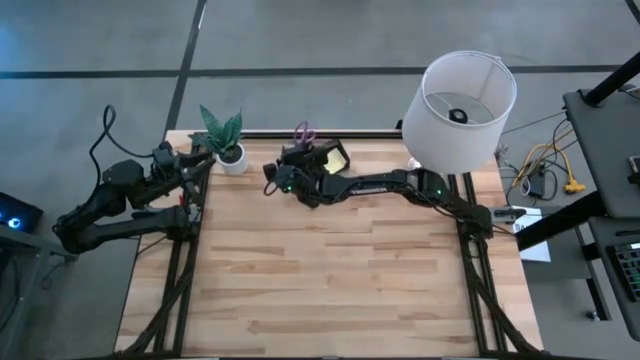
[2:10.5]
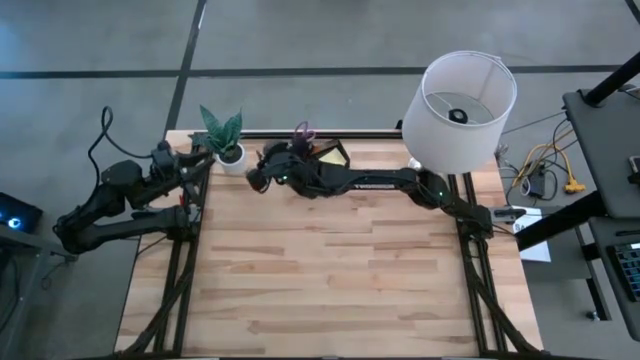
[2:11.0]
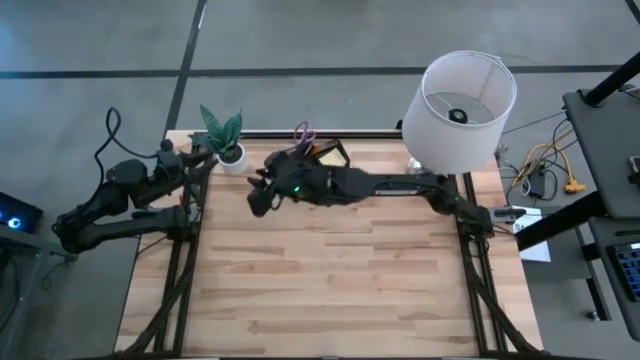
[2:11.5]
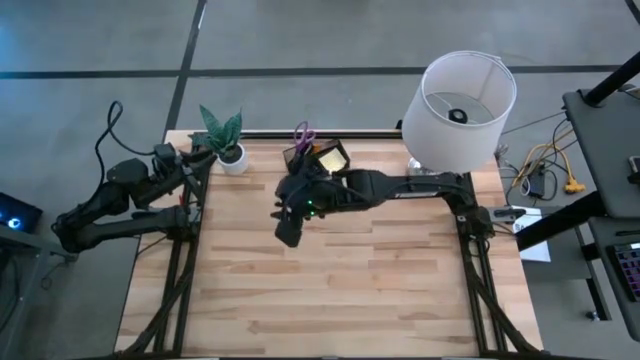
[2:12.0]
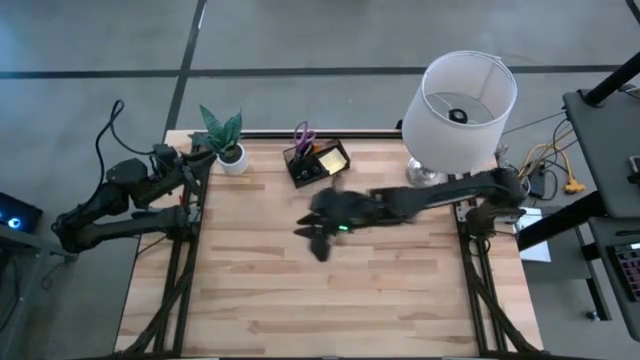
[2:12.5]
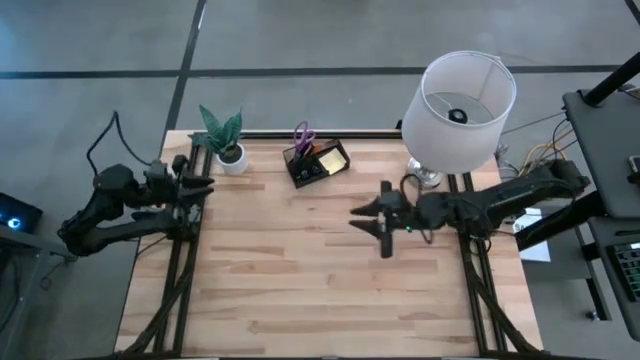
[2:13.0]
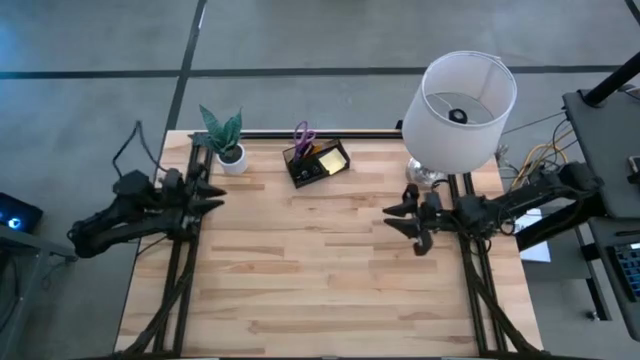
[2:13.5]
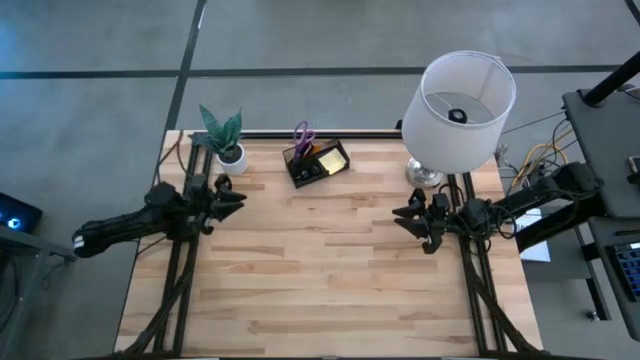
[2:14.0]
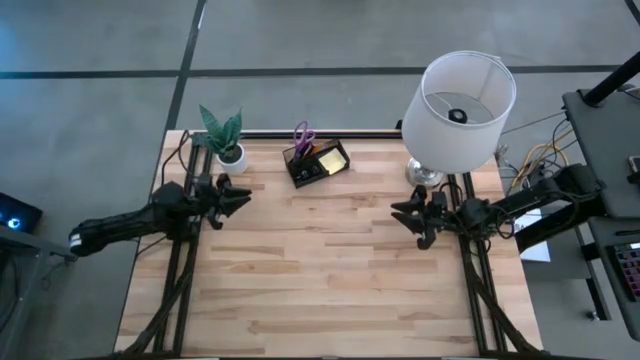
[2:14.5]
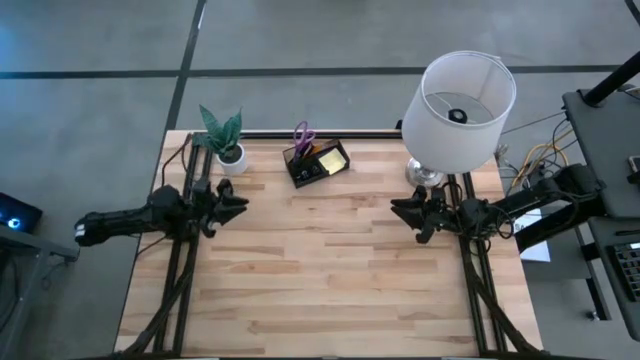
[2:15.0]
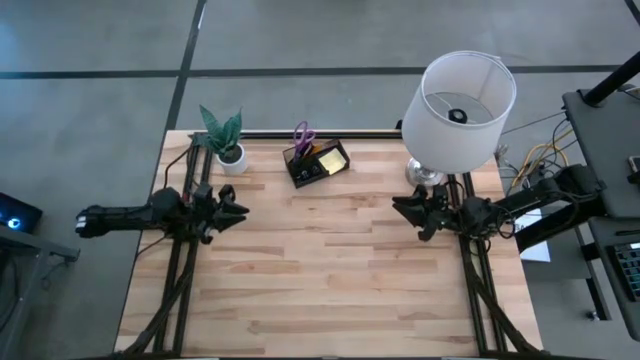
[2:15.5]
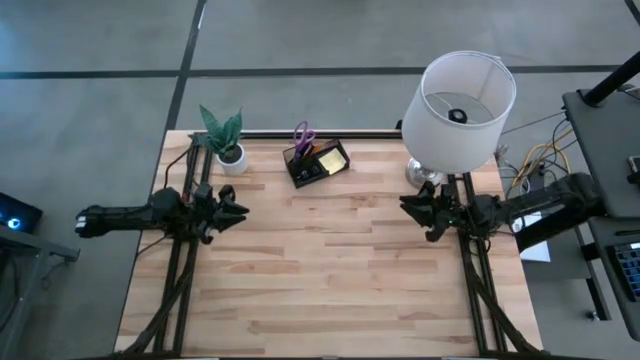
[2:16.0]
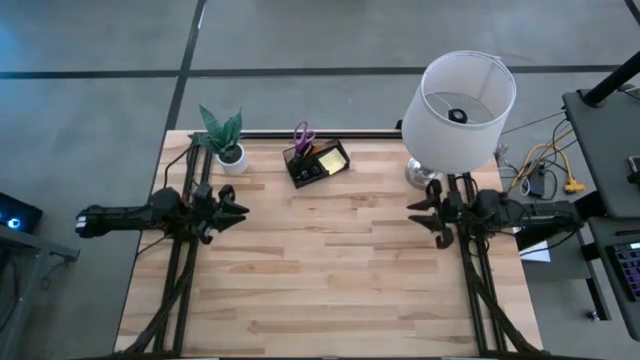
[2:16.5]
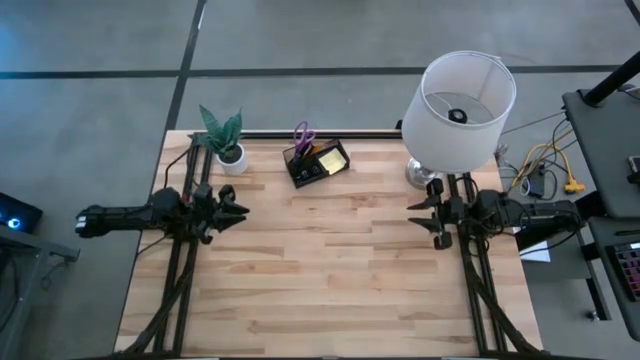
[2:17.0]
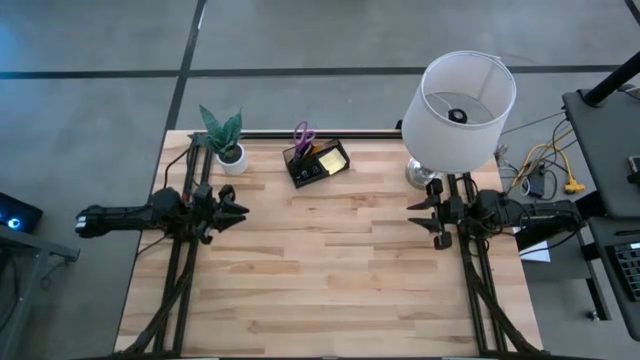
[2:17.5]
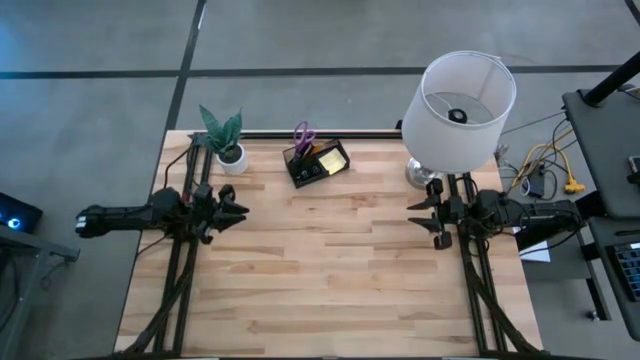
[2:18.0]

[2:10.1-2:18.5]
Task: Pick and place office supplies into organizer
Return to Home Position

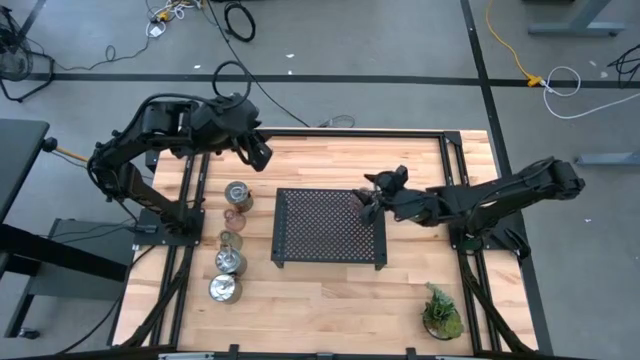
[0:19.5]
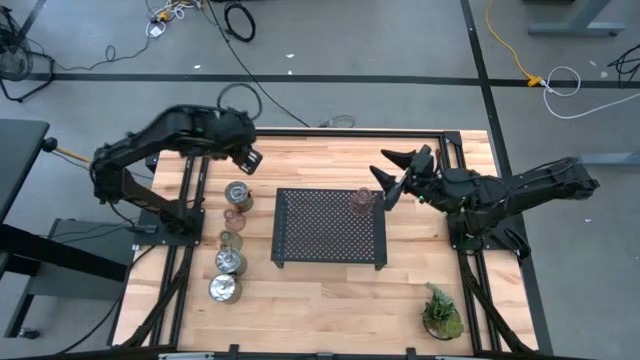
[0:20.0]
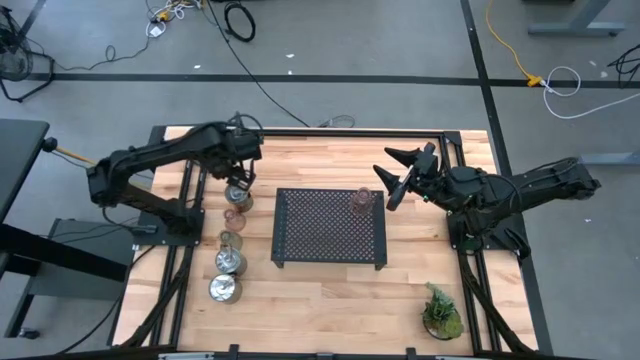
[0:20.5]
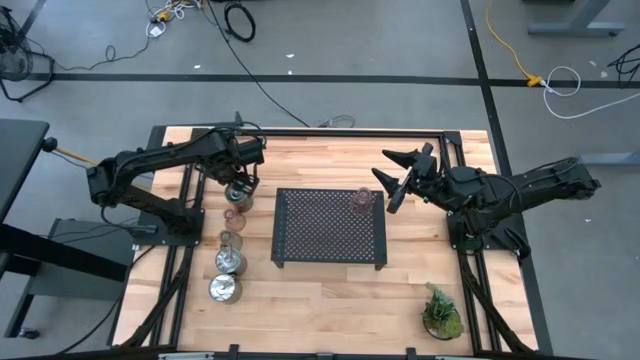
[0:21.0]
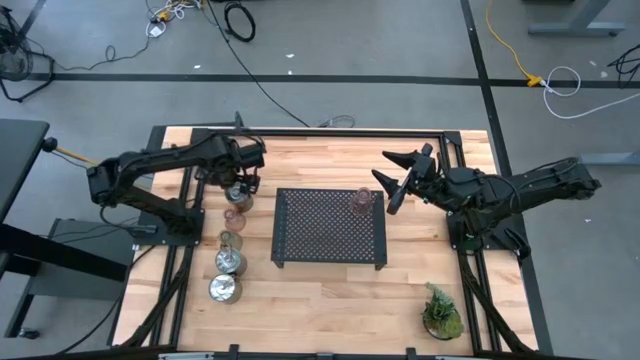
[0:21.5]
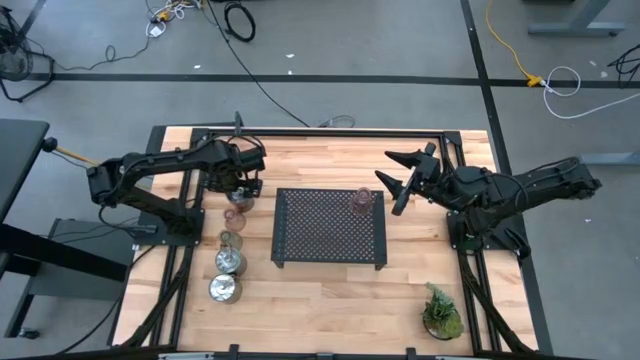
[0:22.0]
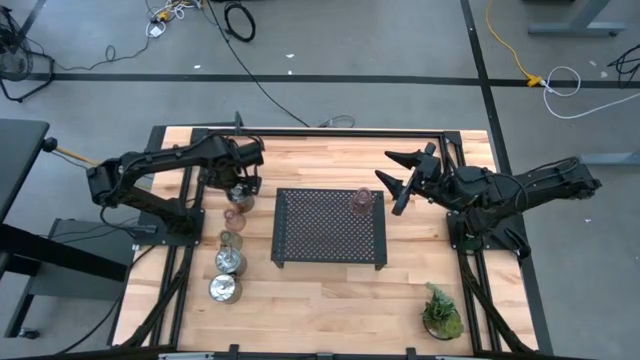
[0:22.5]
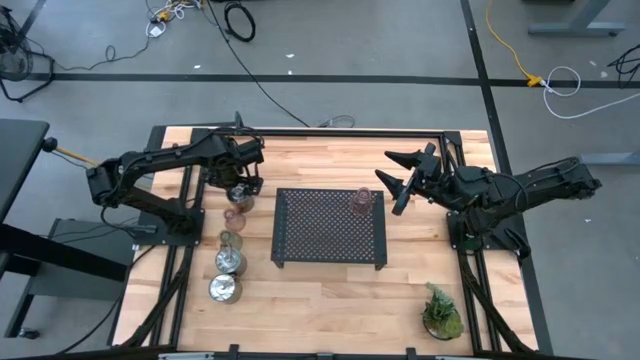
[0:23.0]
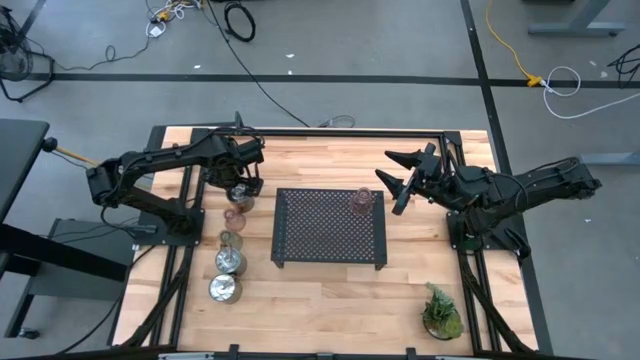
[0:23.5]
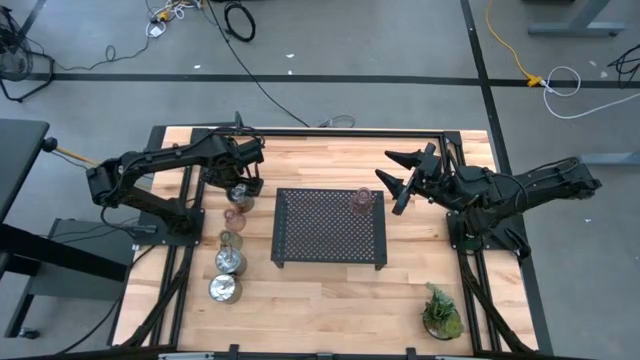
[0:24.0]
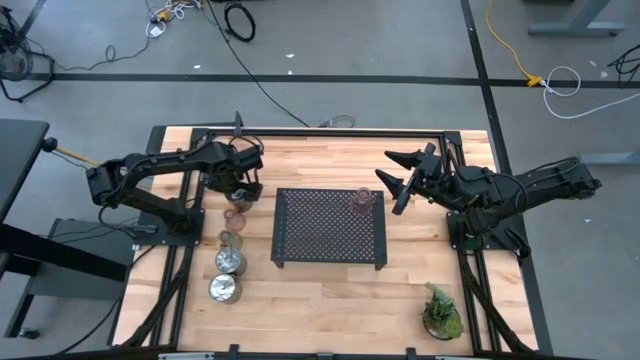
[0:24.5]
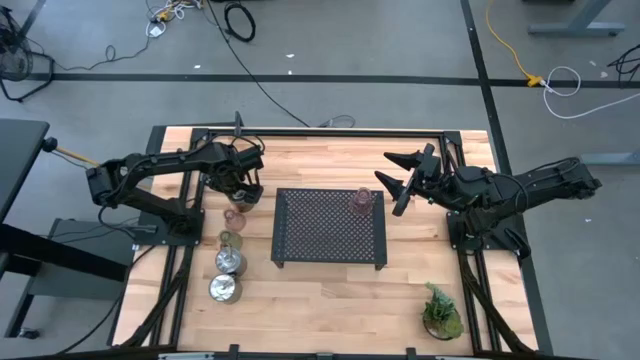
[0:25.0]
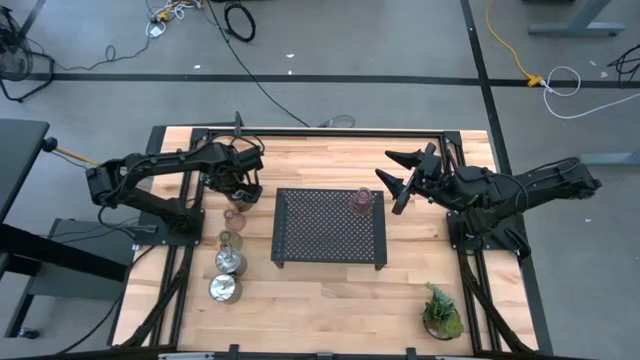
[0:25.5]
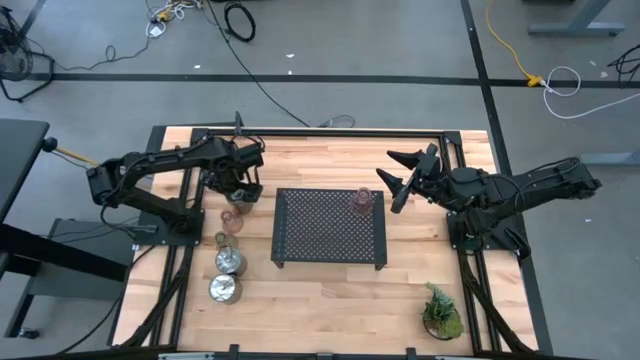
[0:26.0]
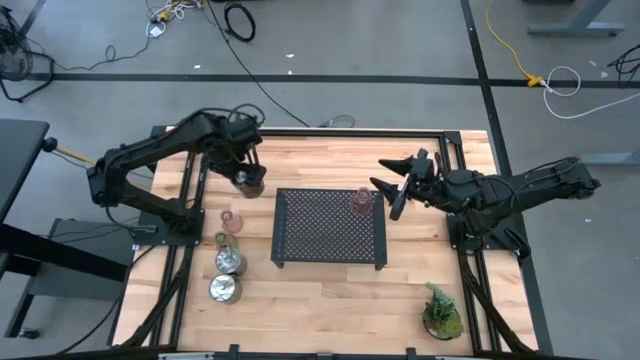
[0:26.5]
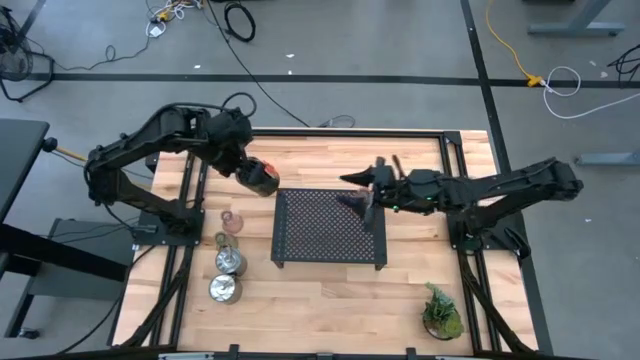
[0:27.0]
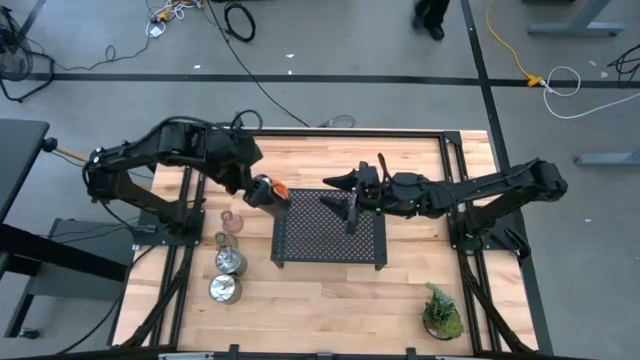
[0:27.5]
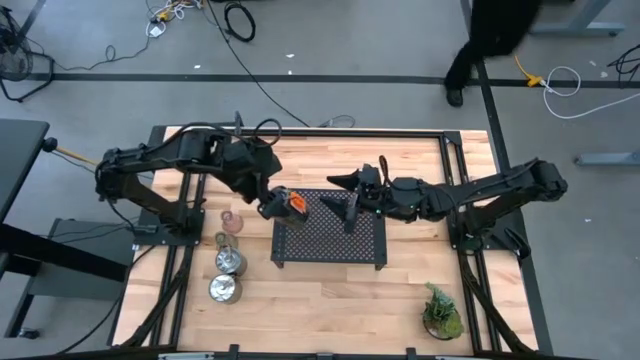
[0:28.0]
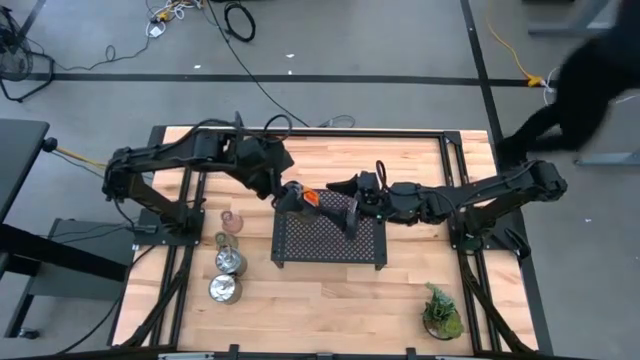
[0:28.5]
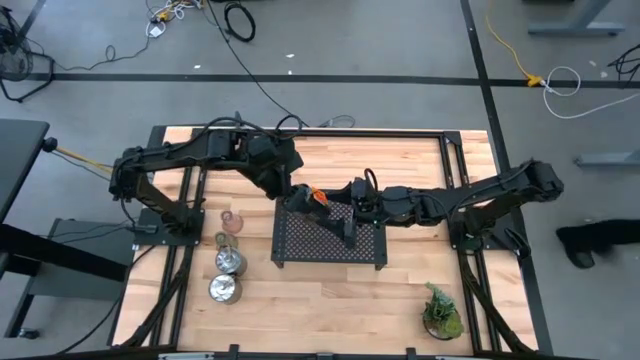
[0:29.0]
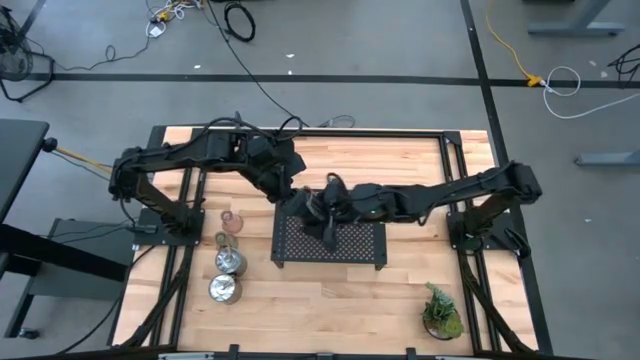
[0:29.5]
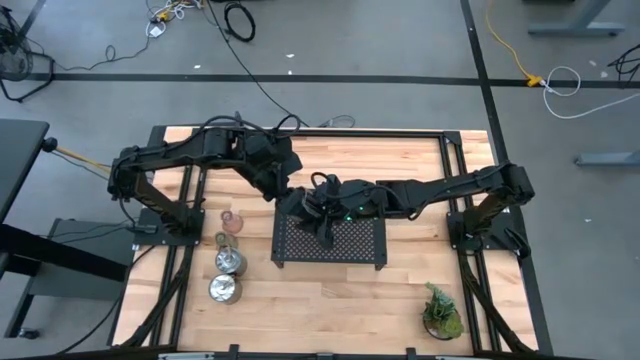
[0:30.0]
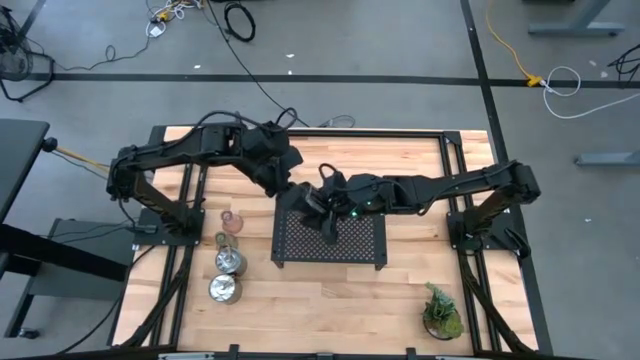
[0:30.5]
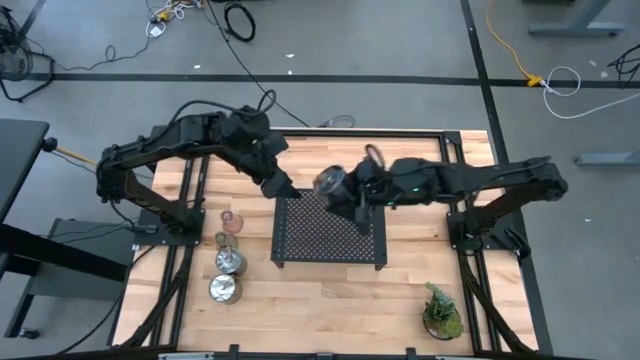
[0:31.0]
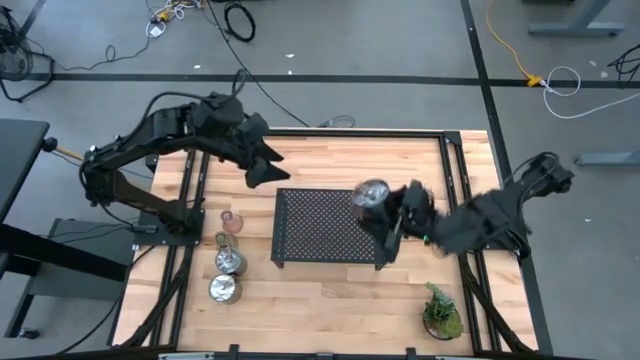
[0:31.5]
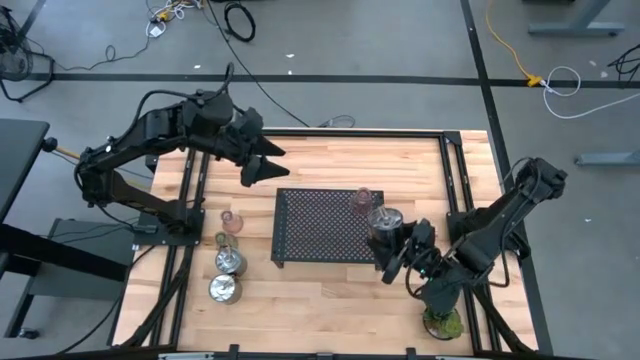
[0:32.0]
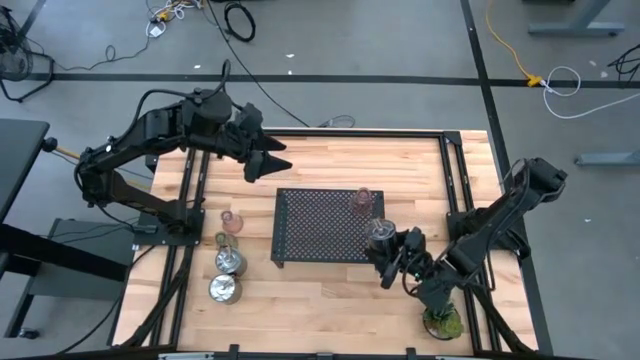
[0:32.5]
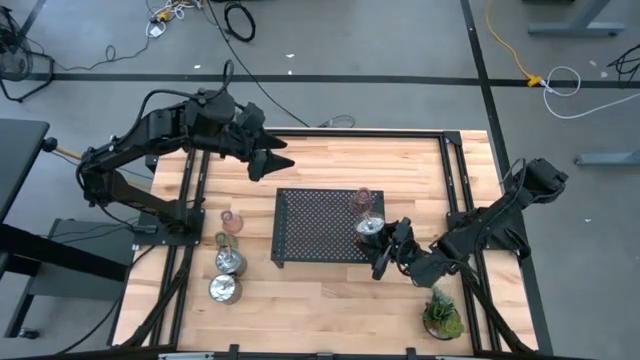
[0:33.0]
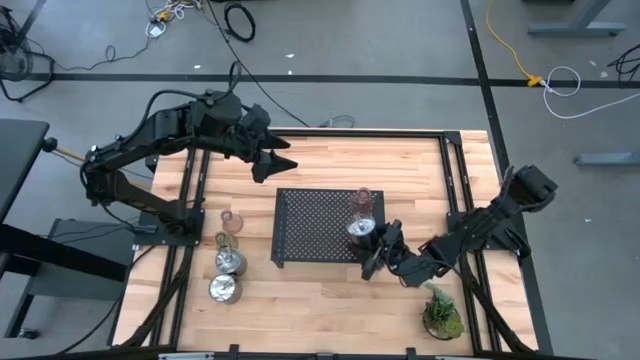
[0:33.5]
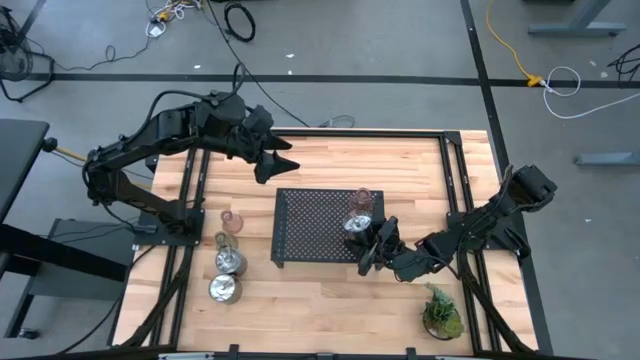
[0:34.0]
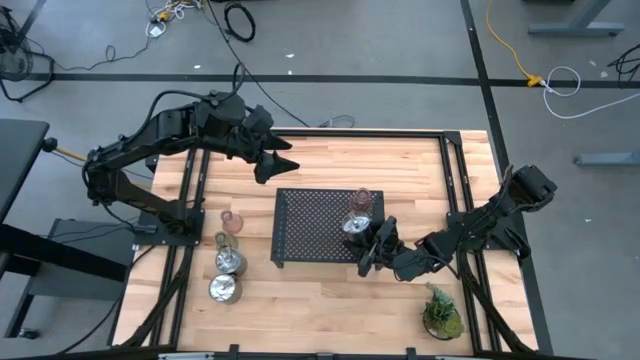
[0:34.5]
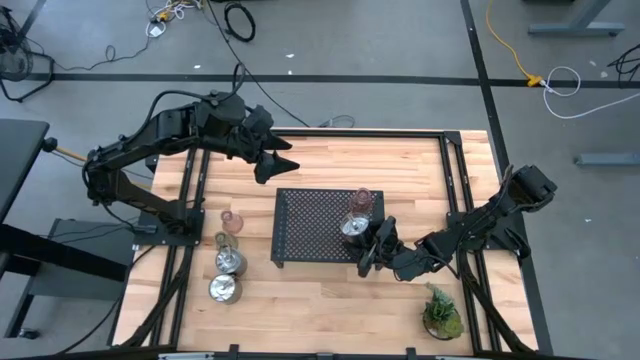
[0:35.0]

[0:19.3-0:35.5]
Task: Pick & Place candle stick holders
Put the silver scented candle on the shelf
